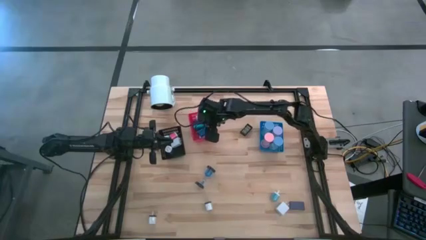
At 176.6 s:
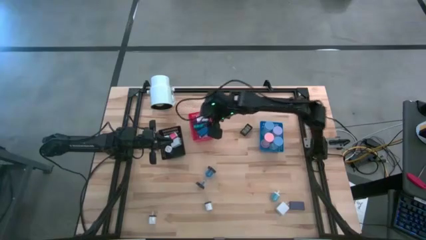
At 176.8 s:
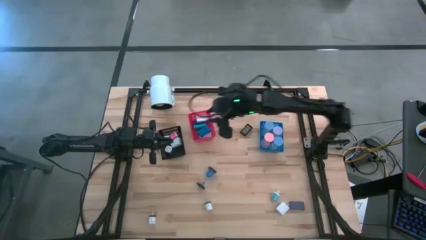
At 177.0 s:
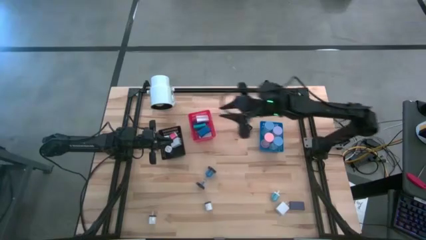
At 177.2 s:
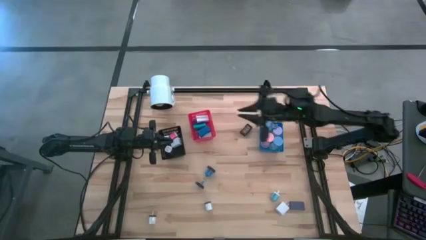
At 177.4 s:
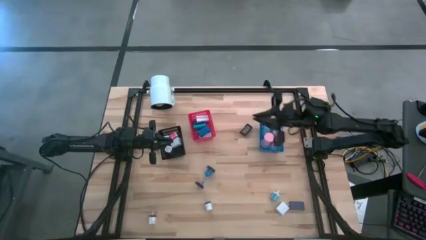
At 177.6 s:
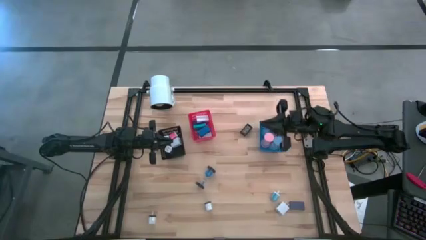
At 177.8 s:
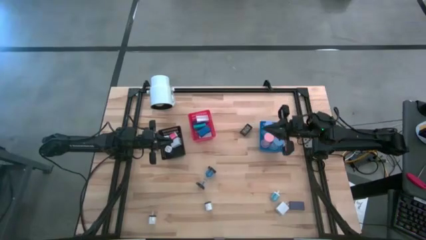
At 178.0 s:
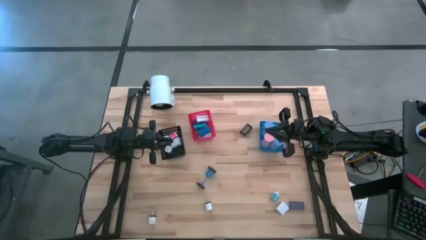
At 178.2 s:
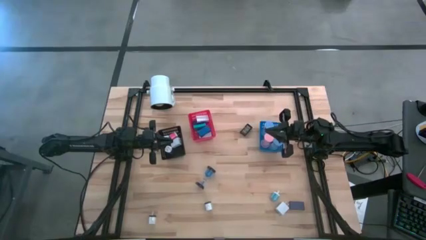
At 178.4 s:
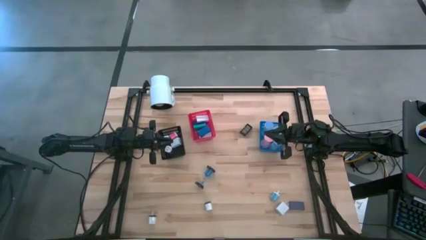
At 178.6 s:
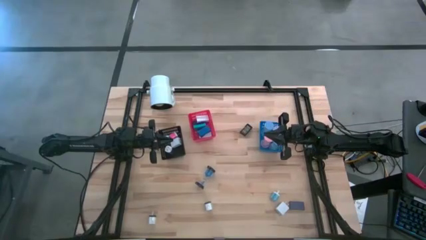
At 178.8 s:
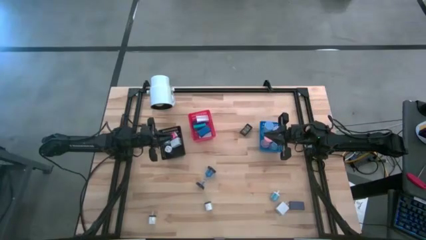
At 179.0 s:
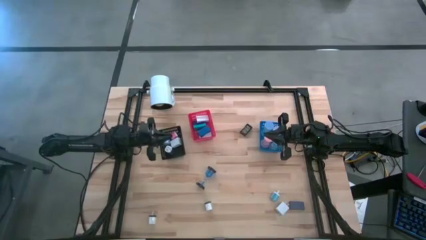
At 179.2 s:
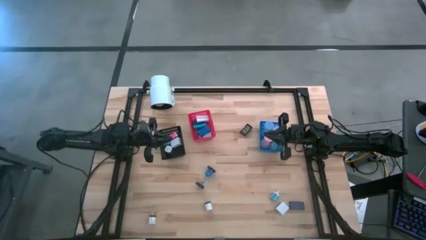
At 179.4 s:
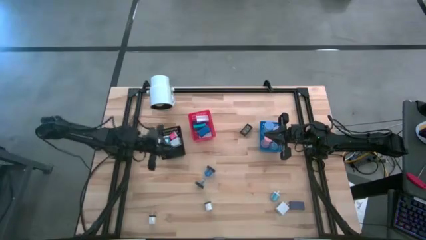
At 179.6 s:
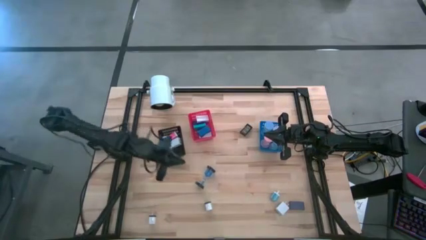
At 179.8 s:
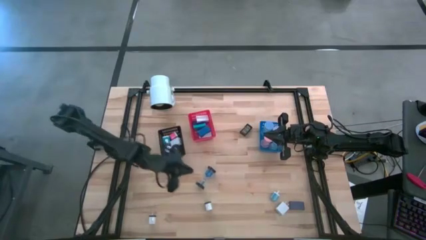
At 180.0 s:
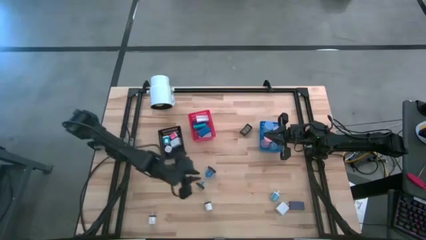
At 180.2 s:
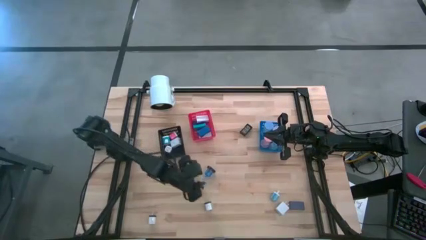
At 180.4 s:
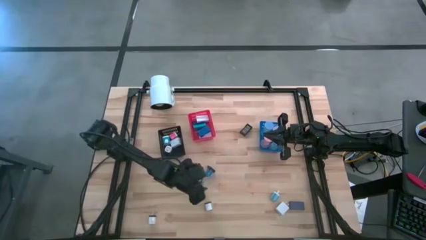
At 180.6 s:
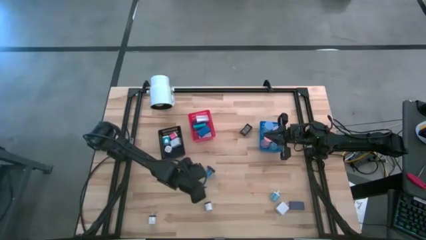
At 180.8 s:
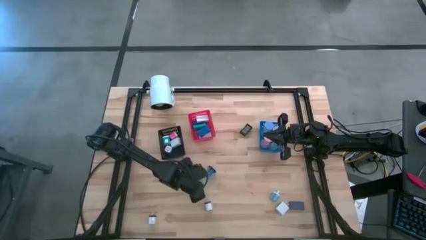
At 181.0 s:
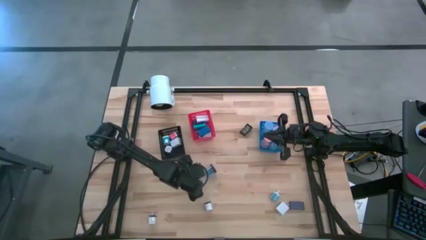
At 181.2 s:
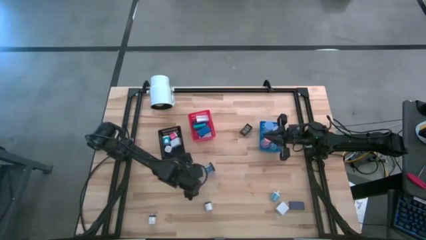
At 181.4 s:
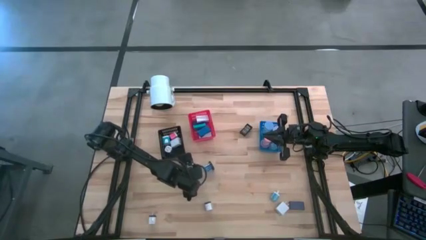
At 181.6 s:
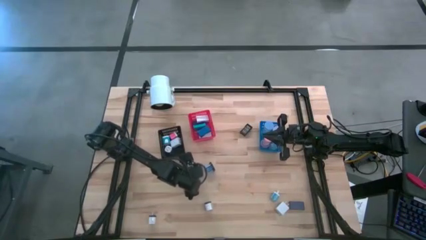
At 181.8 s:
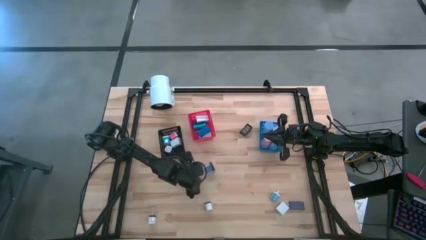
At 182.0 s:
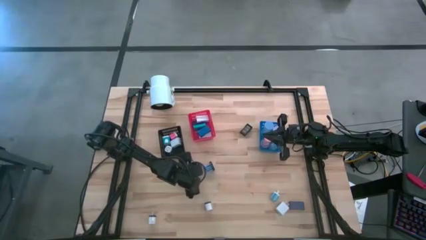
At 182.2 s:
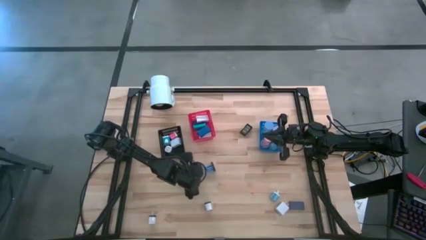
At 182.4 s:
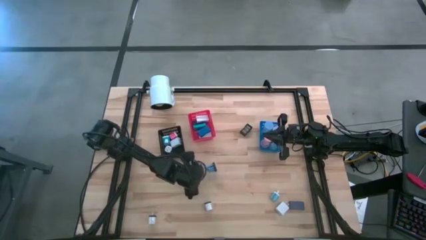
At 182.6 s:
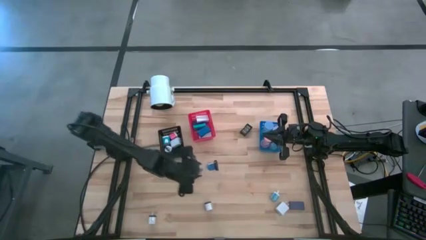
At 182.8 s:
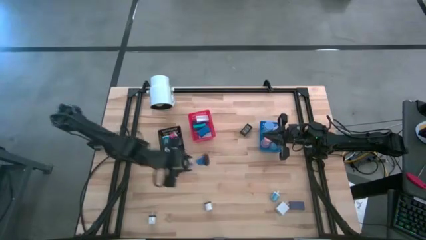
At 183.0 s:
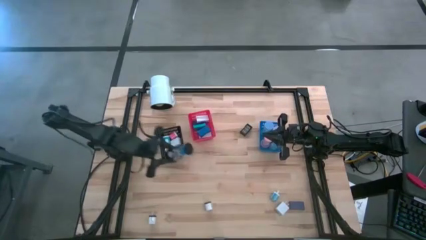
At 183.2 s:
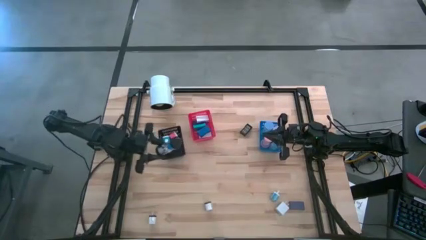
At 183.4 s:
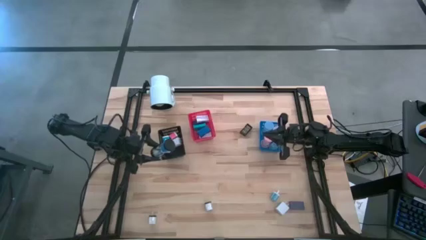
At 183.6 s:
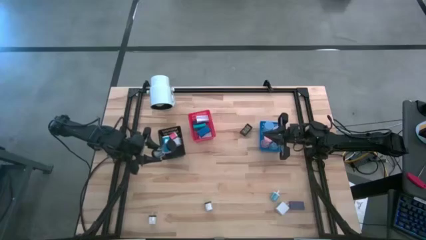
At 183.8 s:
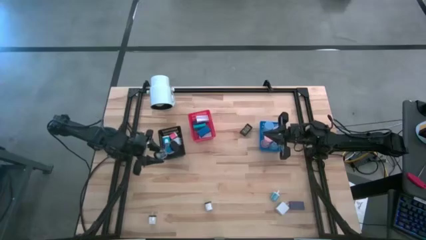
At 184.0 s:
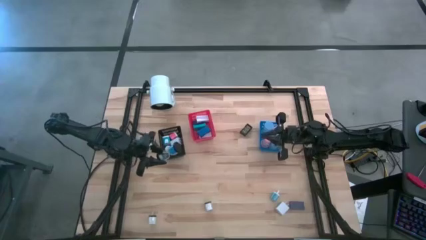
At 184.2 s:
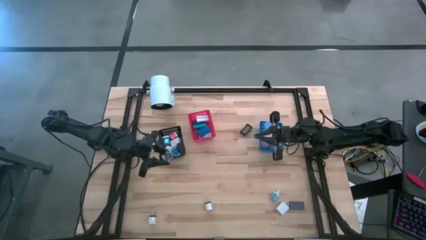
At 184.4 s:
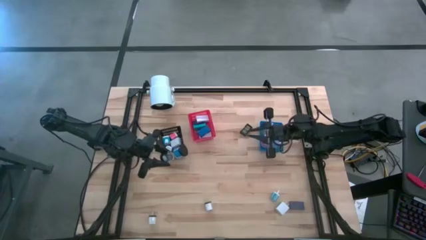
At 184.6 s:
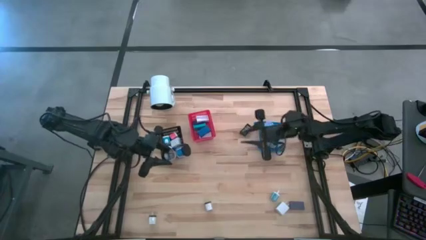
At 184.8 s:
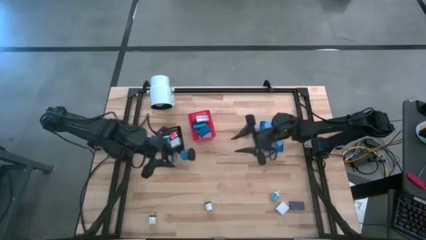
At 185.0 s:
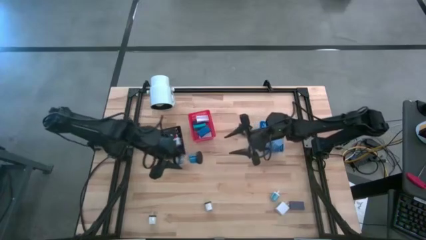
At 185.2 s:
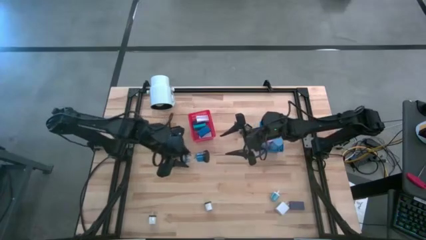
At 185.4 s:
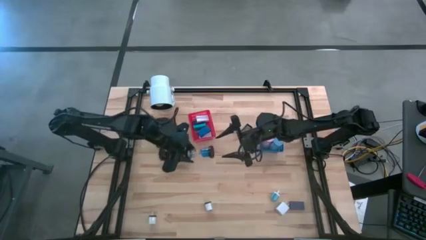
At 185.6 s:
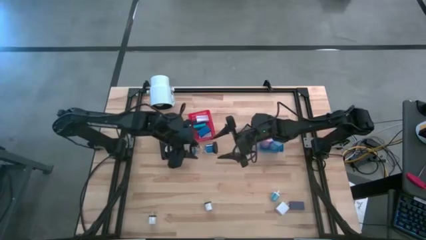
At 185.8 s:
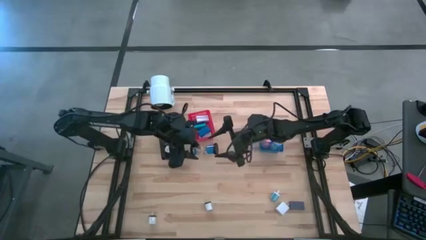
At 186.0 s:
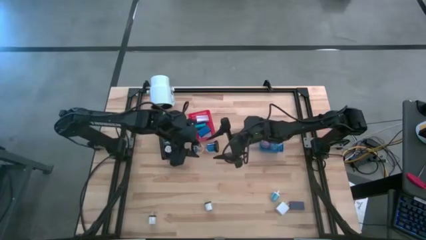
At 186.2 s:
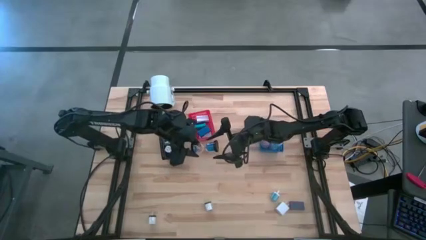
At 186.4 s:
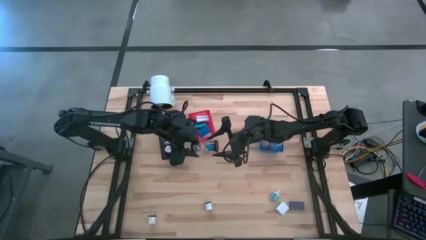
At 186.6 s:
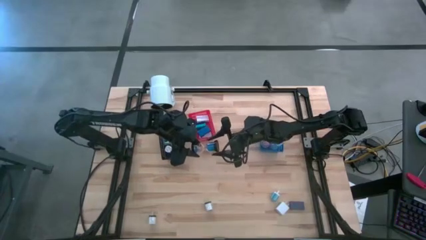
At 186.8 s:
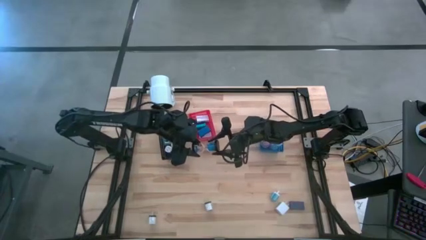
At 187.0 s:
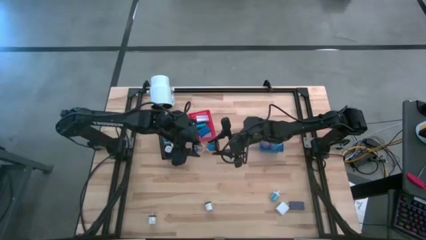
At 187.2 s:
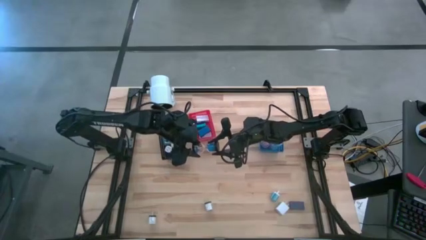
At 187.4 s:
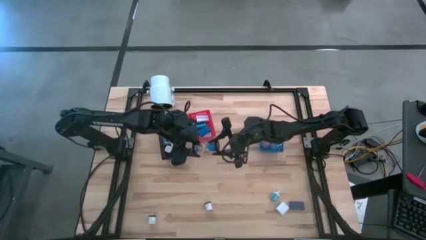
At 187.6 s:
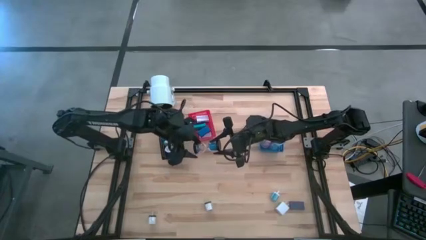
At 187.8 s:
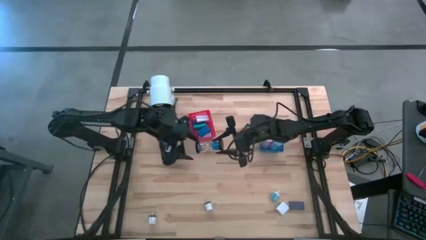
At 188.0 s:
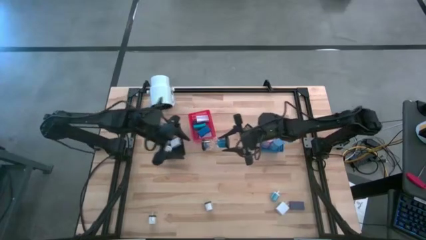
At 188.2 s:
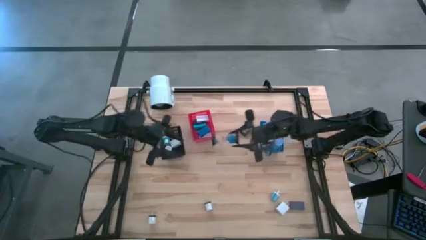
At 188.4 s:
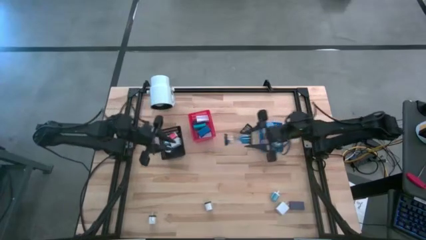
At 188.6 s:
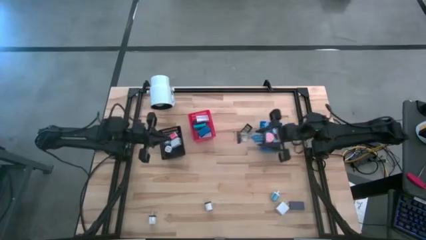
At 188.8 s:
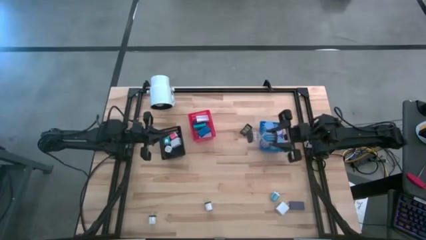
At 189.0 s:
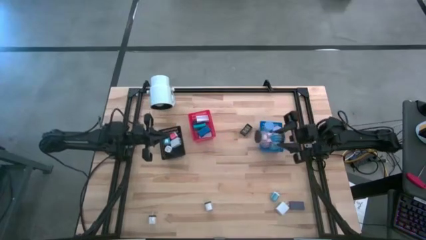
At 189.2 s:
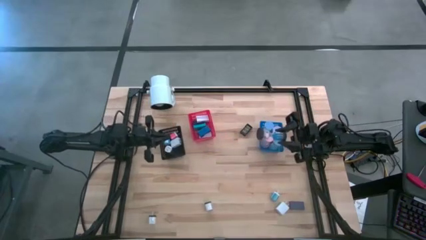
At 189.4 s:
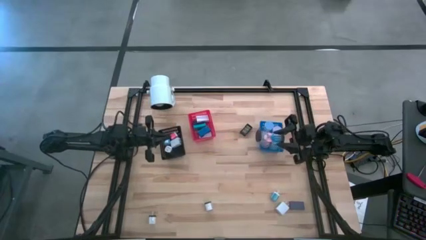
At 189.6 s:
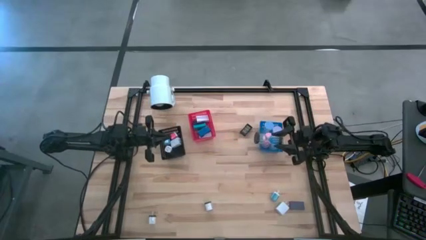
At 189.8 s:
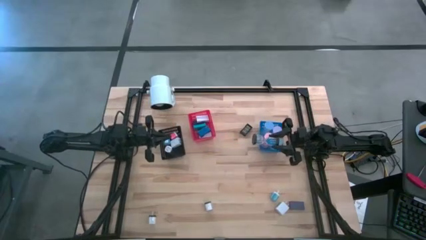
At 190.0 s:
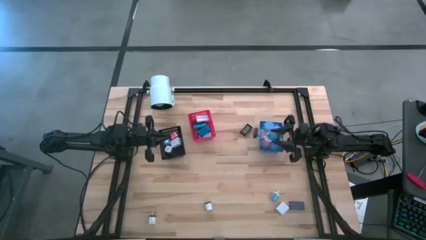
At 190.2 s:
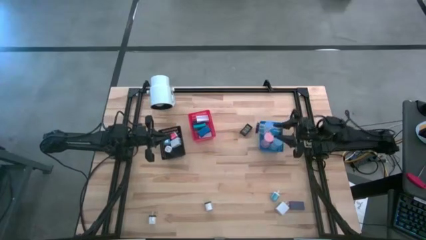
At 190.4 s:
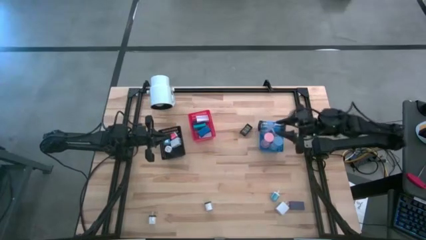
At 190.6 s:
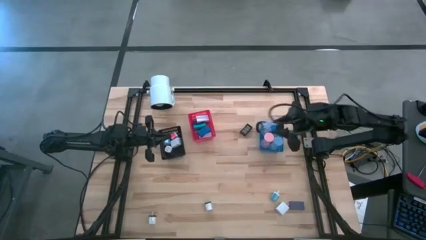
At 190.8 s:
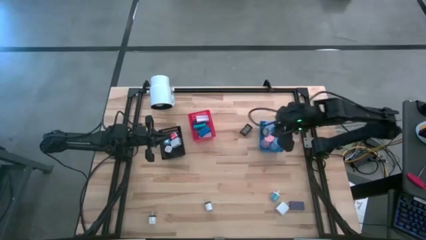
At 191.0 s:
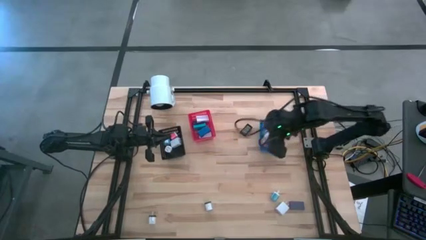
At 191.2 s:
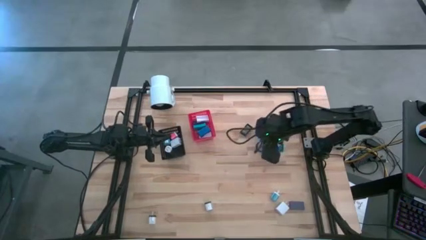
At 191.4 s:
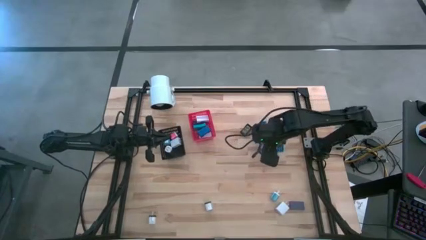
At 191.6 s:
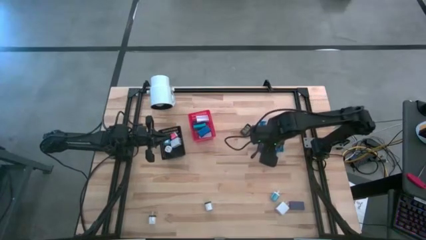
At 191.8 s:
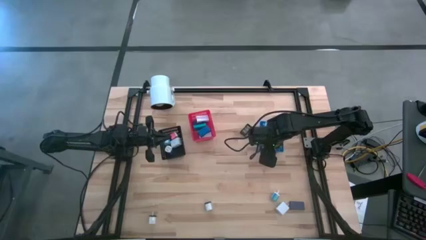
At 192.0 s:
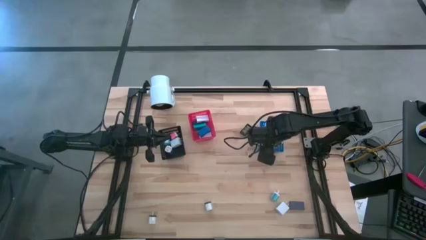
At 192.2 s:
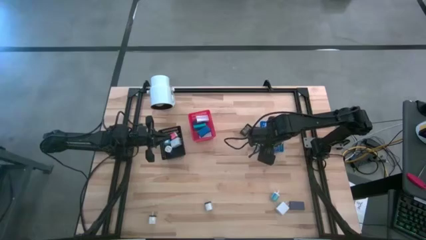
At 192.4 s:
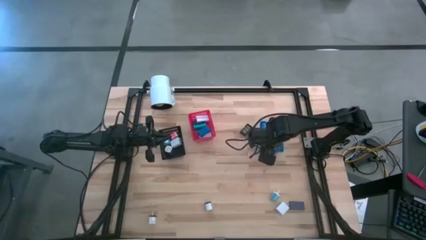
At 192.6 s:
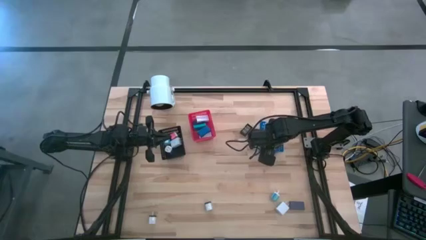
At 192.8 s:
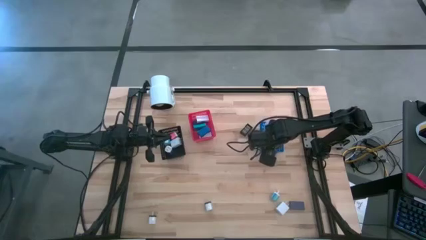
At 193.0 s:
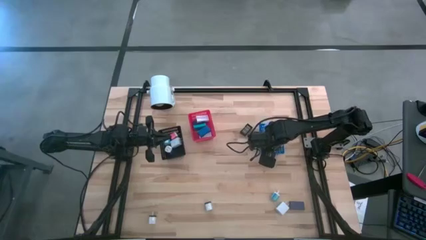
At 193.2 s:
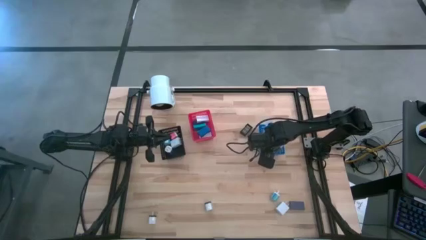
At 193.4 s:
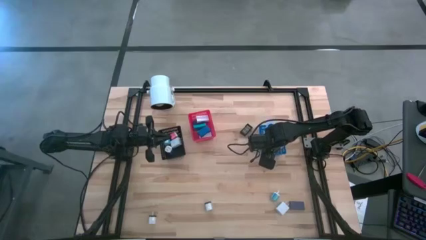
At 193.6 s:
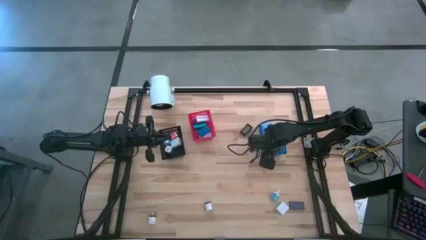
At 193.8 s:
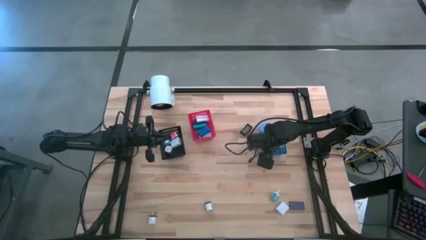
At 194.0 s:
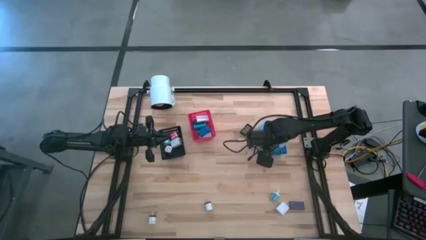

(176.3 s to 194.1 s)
Task: Pick & Place Office items
Put the dark blue hourglass into the blue bin
